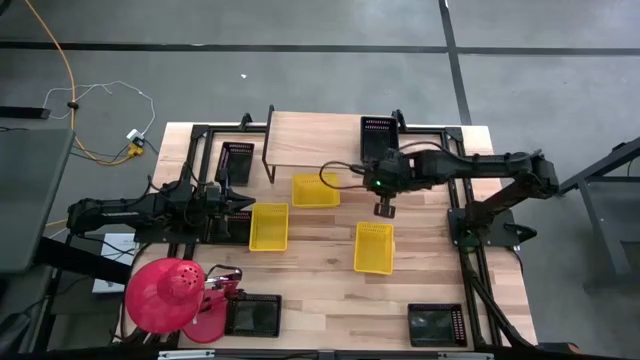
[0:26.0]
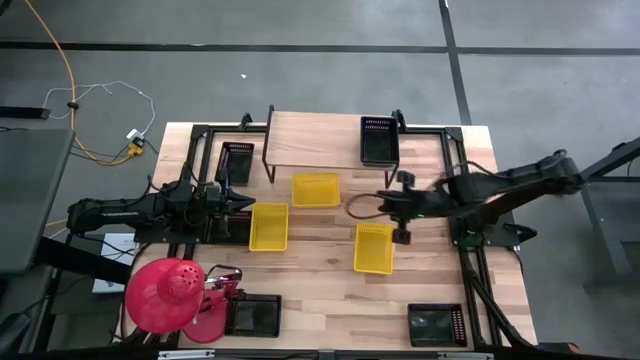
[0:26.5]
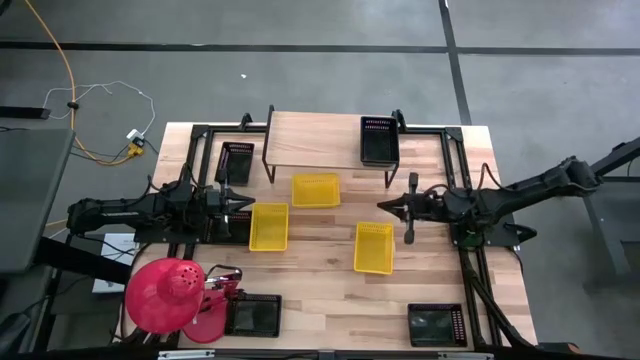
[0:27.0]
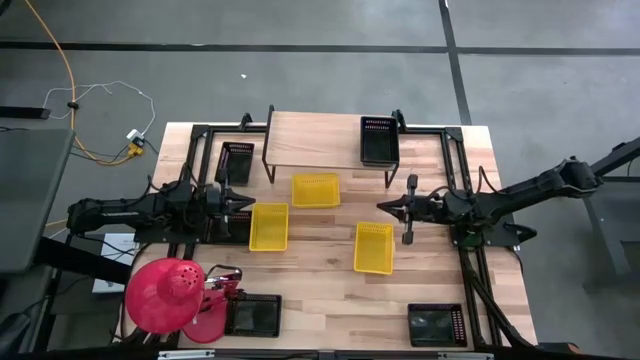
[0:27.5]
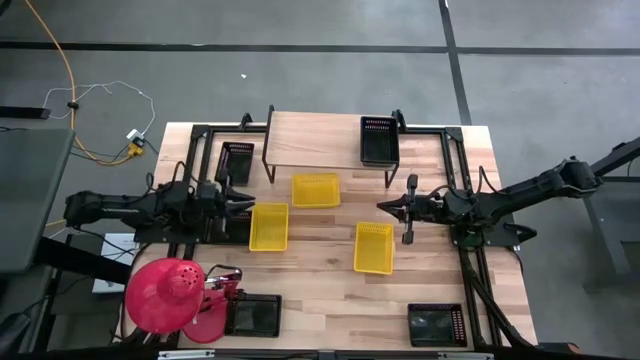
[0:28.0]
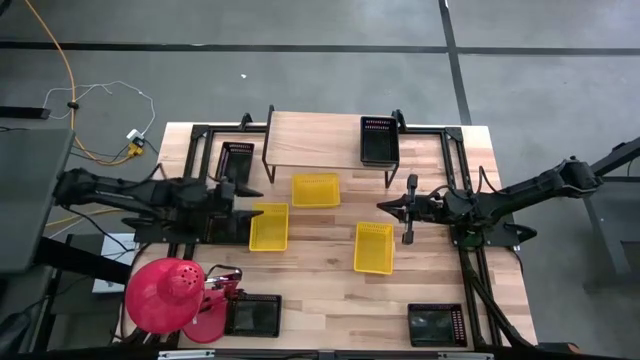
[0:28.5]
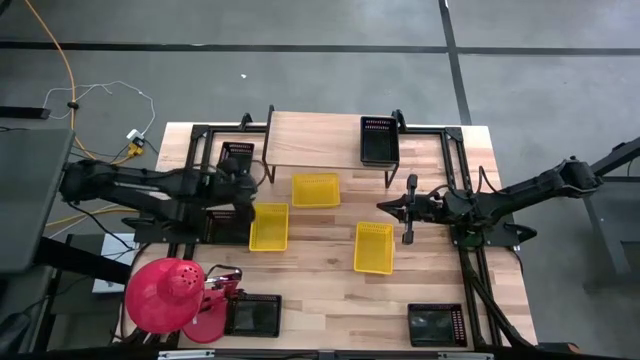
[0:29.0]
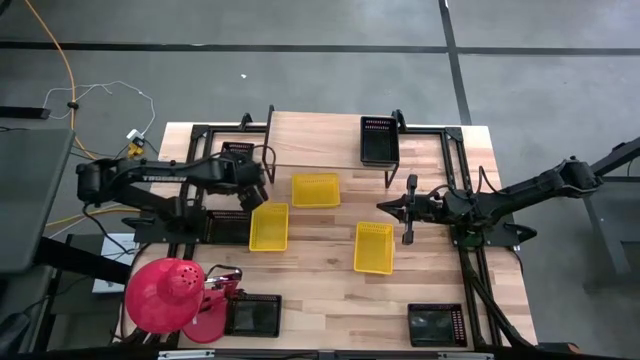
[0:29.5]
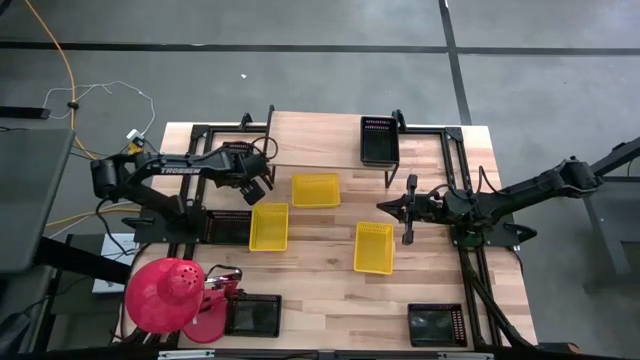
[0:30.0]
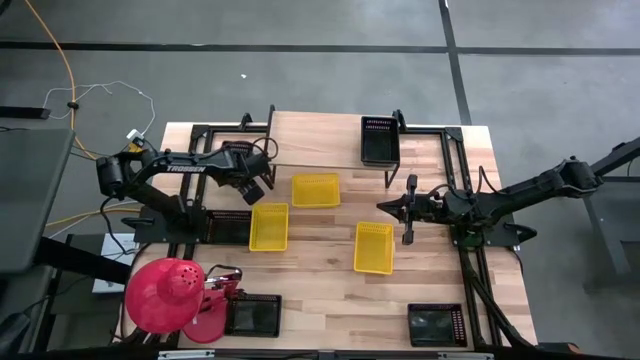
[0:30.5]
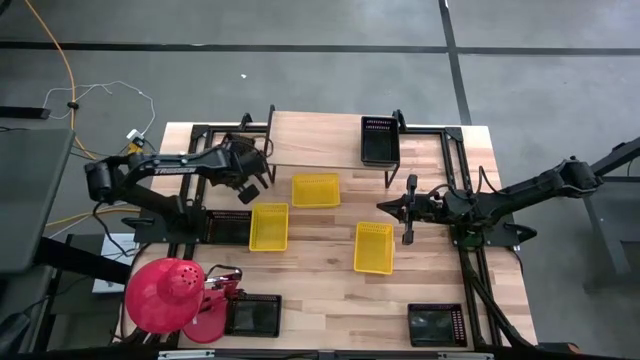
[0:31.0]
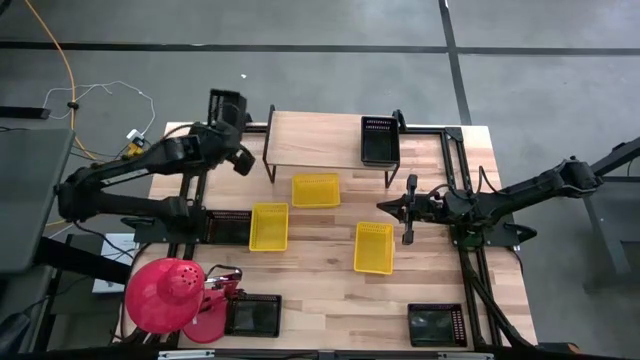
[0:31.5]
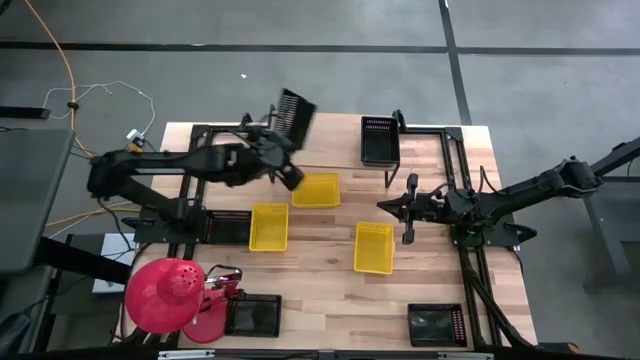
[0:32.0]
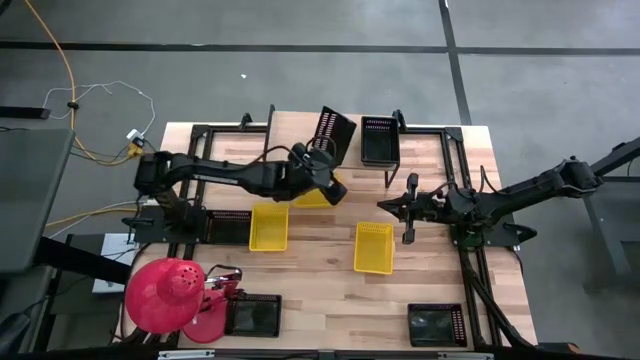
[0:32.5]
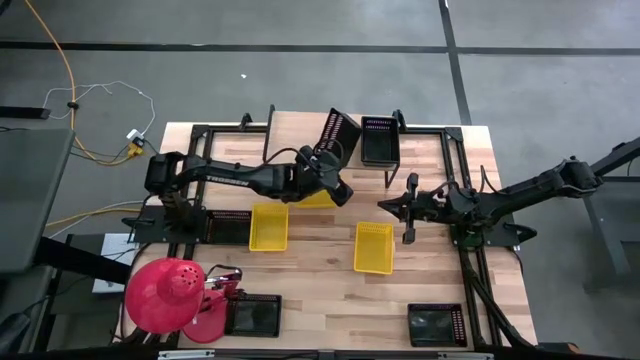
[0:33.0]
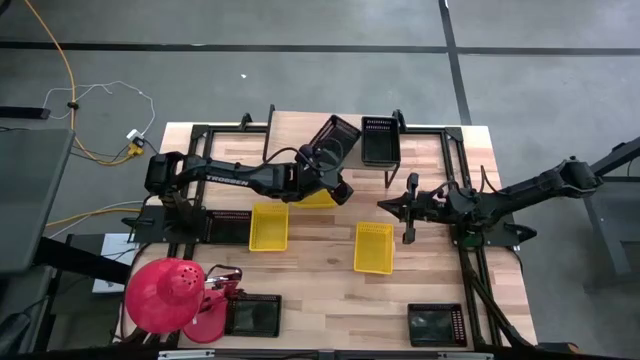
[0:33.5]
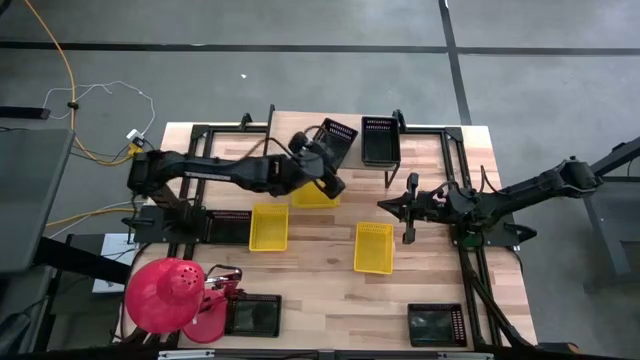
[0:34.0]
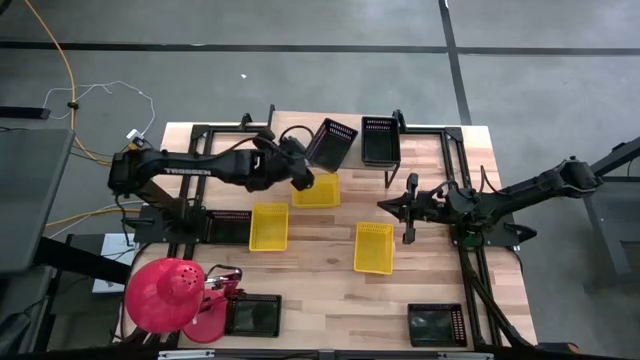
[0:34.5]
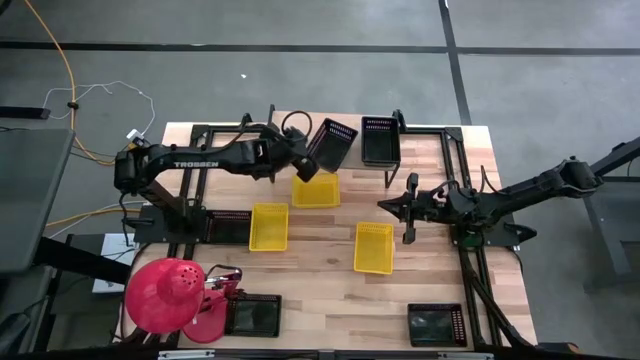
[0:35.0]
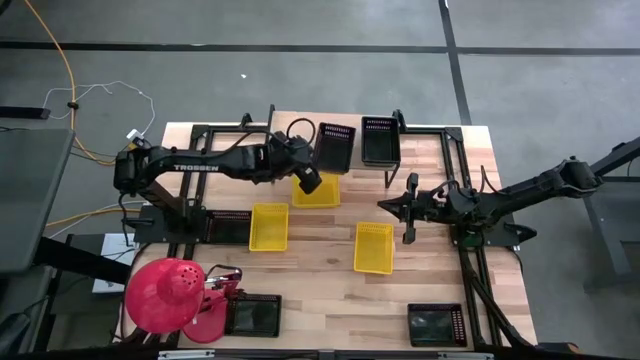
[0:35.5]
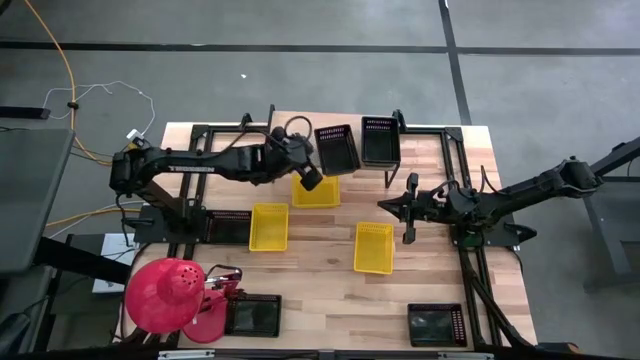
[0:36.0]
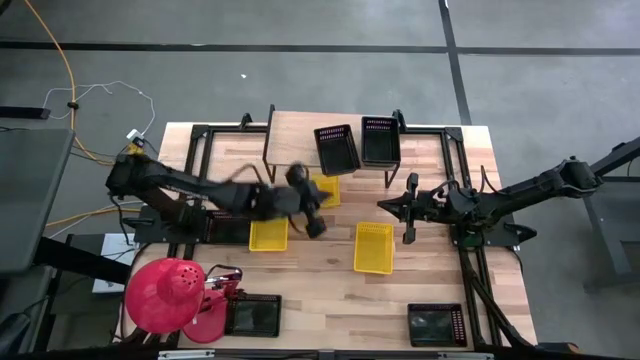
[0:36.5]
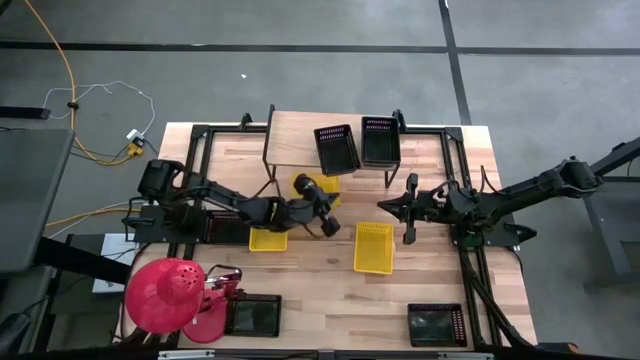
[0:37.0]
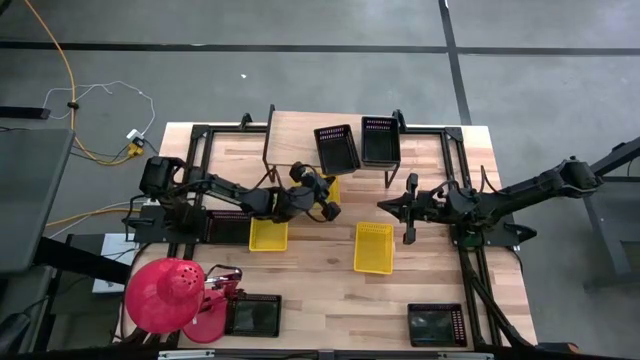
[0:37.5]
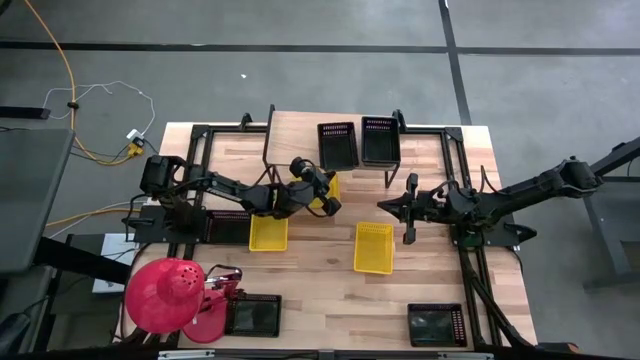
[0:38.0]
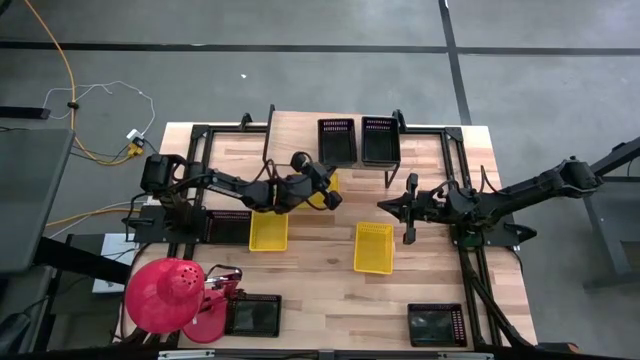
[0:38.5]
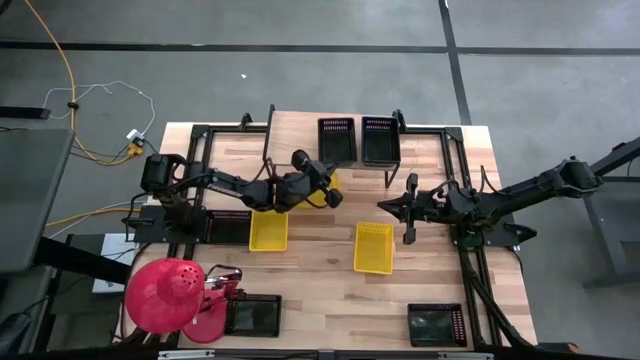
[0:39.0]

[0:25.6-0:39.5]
Task: Stack baskets on shelf by color
Put the black bin on the shelf

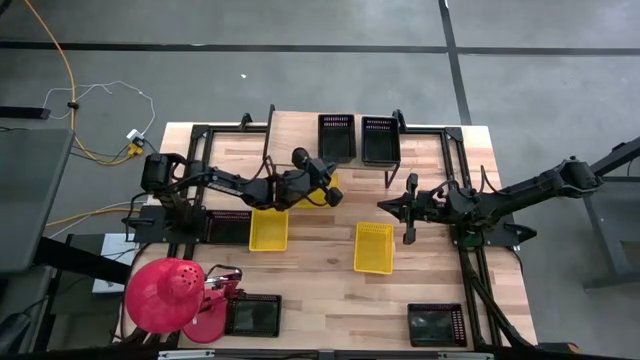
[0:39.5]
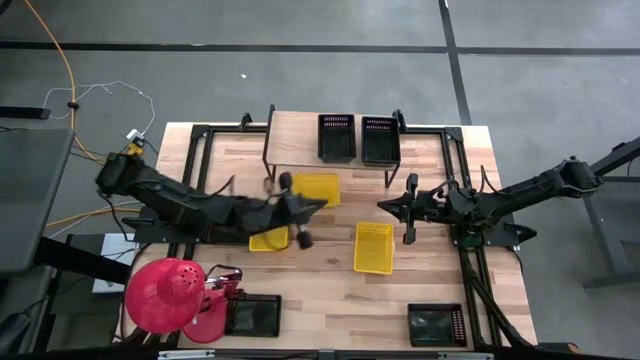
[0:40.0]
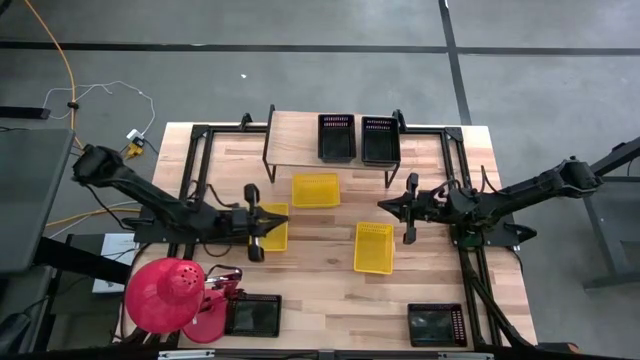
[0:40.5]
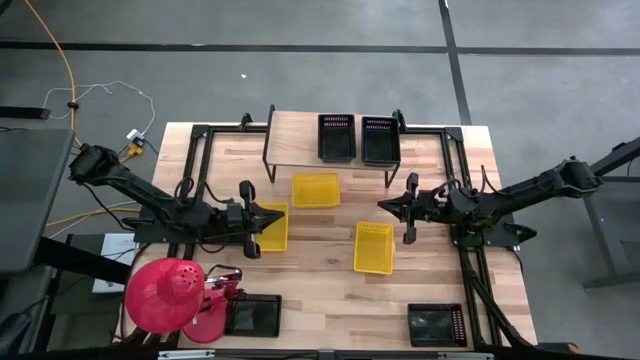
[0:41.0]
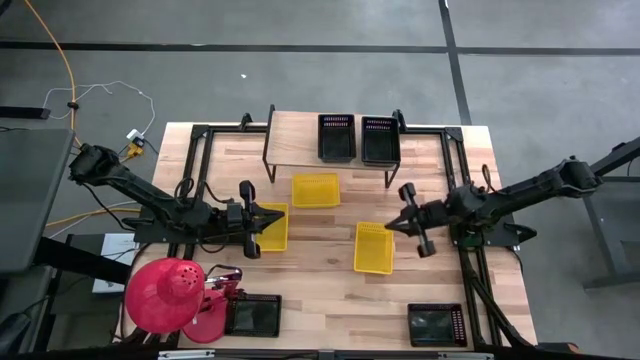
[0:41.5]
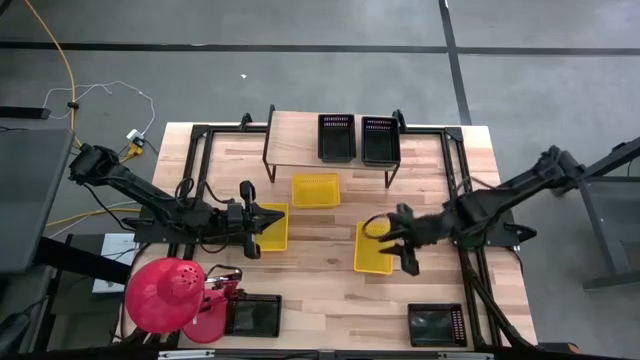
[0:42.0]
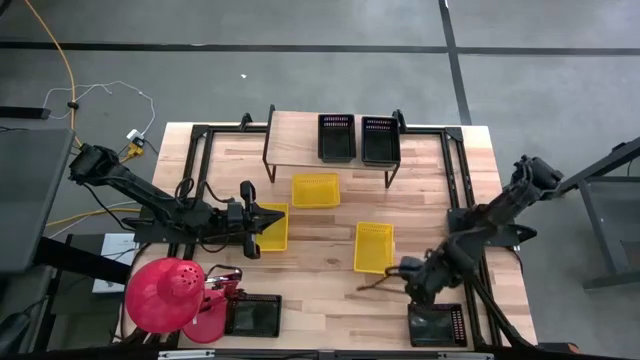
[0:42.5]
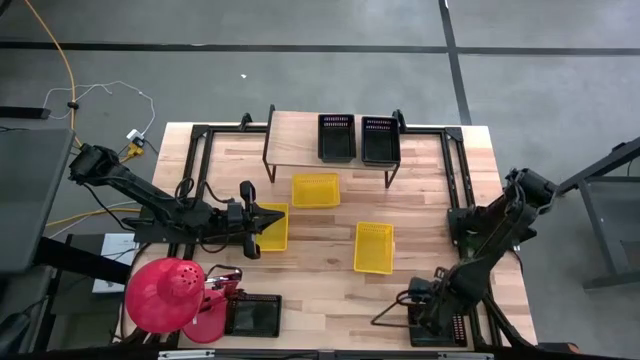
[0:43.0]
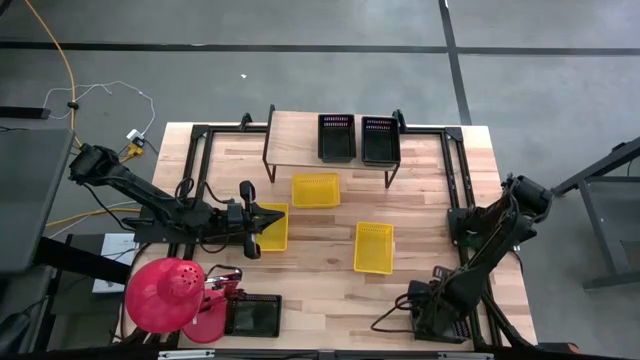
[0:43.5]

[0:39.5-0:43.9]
Stack the black bin on the black bin on the shelf

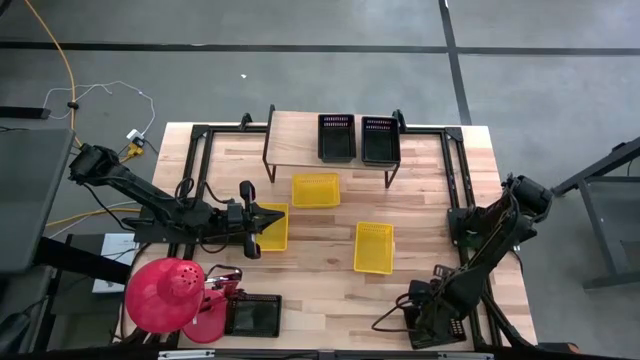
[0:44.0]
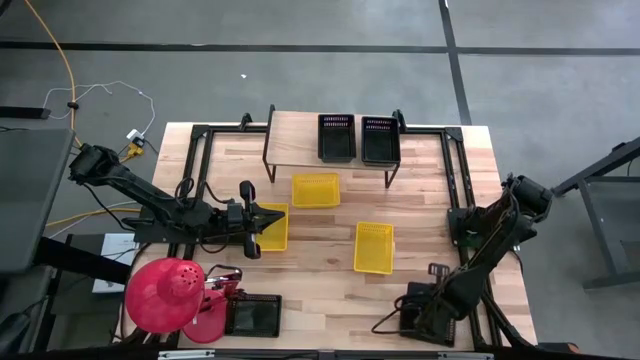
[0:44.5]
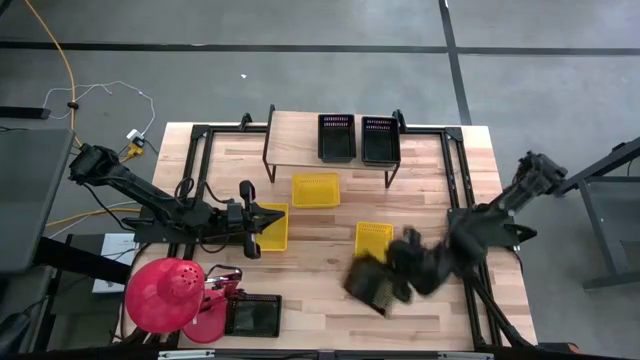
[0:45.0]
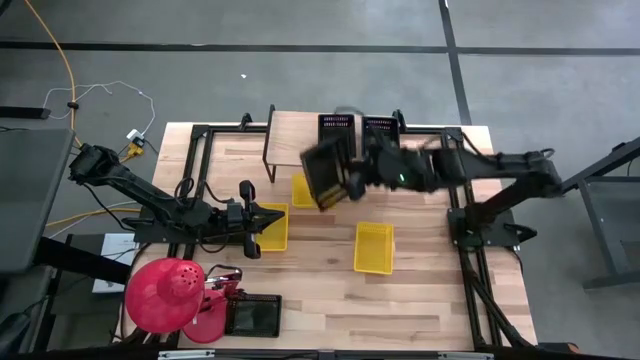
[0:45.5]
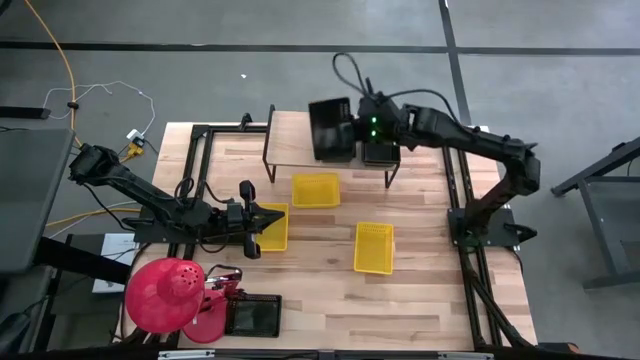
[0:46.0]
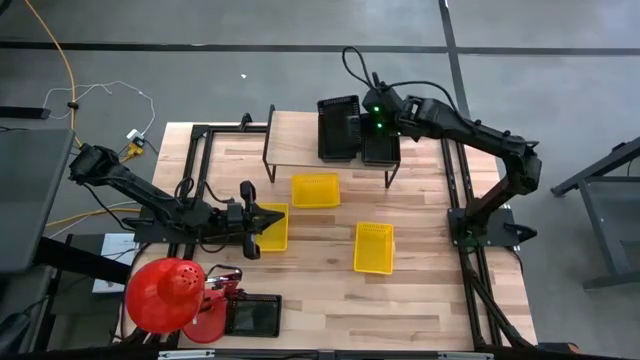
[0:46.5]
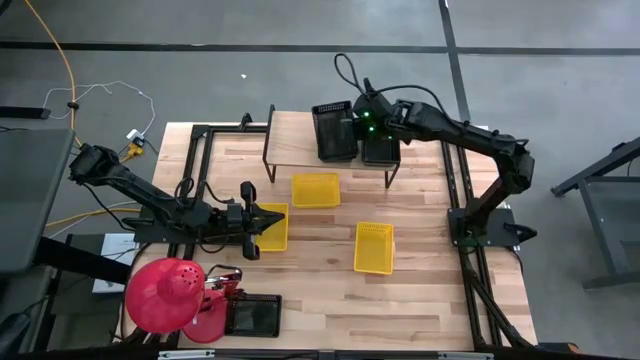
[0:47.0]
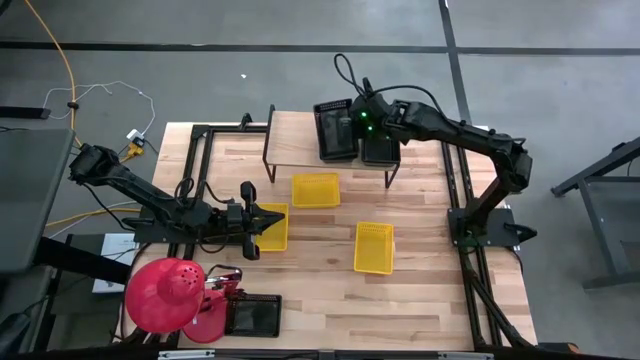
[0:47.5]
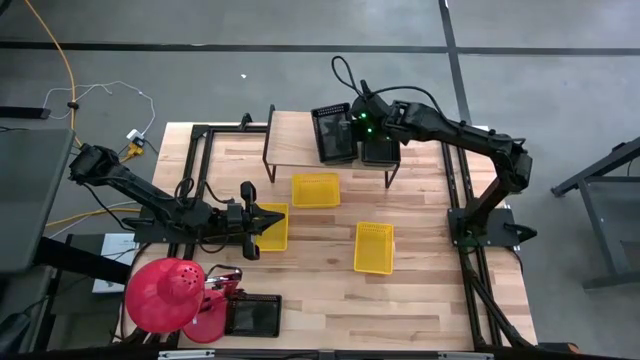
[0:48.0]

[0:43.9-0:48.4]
Stack the black bin on the black bin on the shelf
